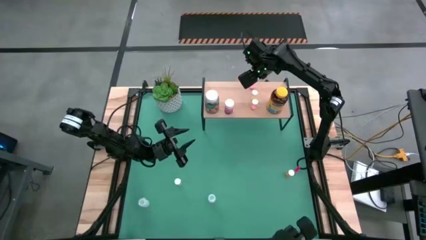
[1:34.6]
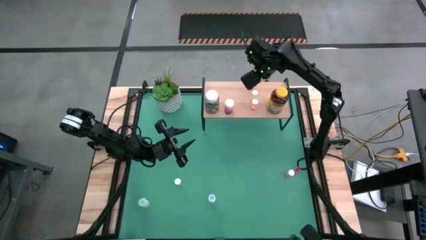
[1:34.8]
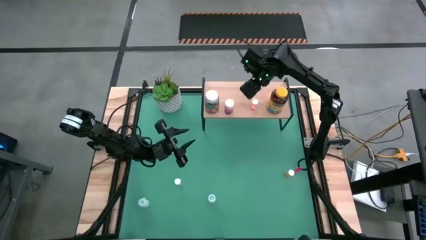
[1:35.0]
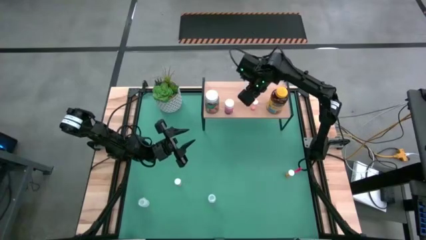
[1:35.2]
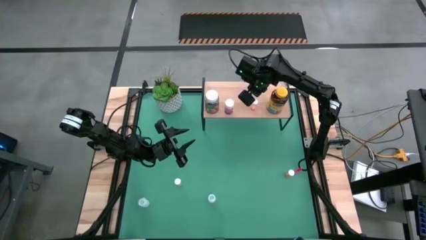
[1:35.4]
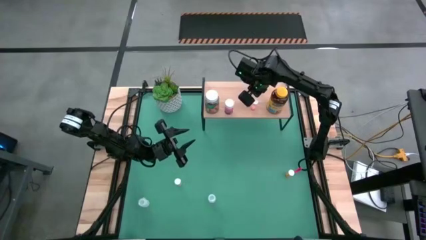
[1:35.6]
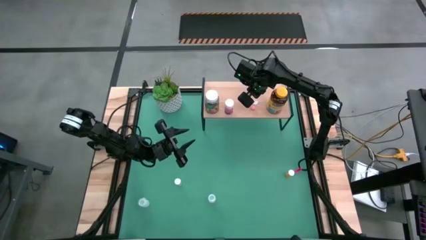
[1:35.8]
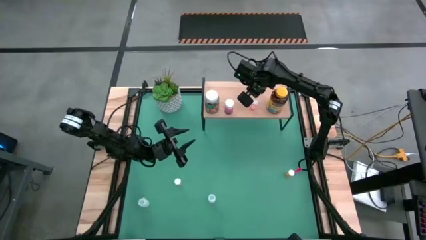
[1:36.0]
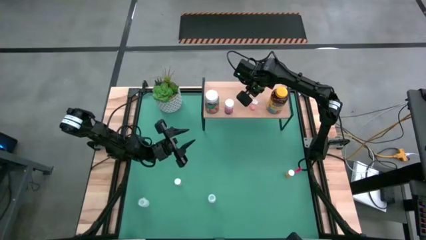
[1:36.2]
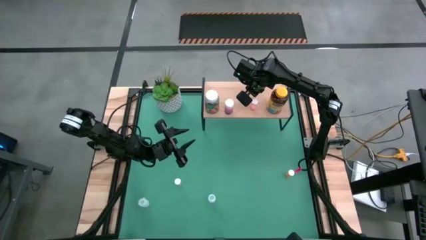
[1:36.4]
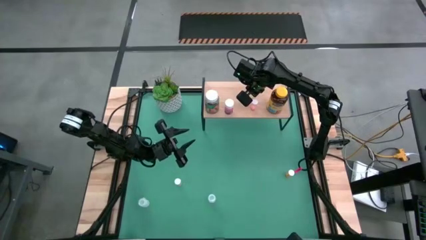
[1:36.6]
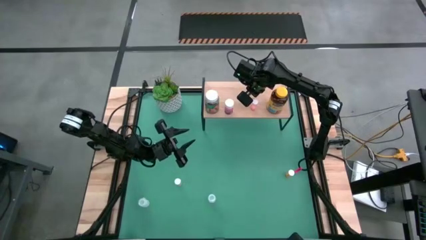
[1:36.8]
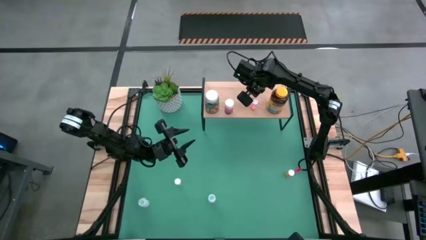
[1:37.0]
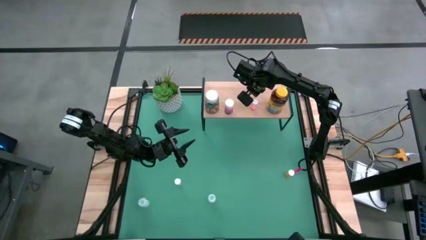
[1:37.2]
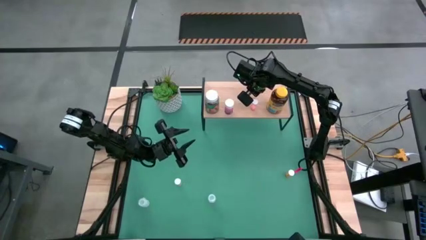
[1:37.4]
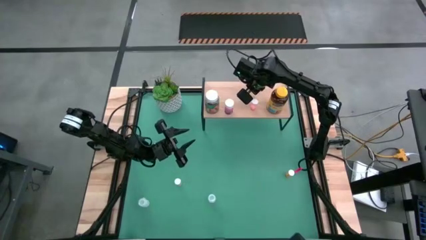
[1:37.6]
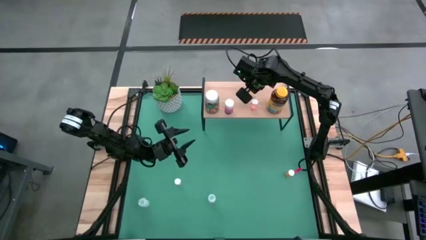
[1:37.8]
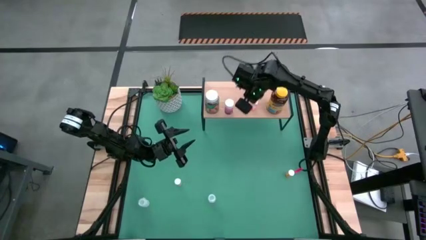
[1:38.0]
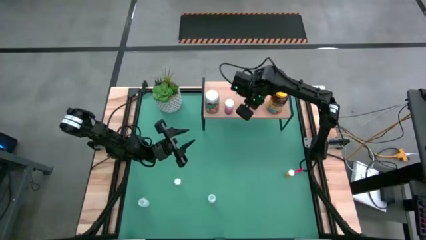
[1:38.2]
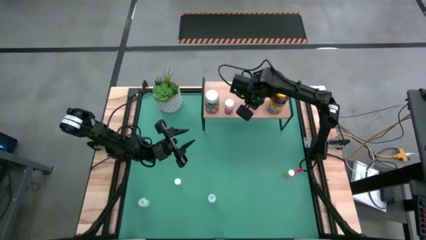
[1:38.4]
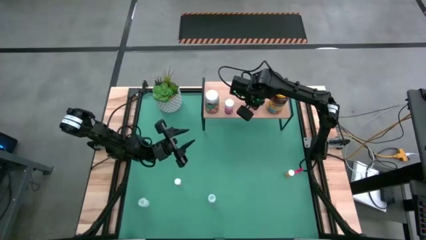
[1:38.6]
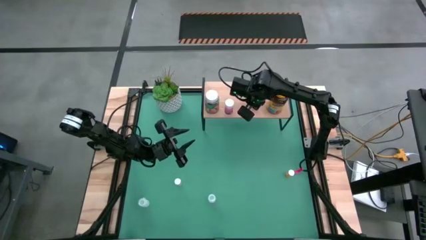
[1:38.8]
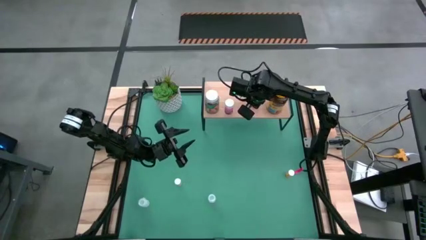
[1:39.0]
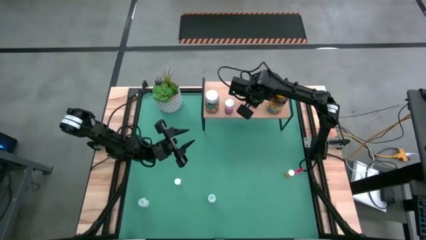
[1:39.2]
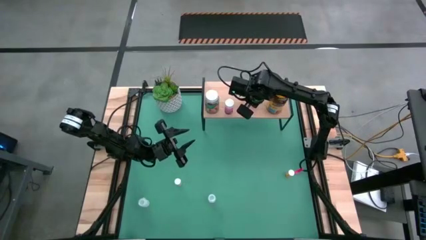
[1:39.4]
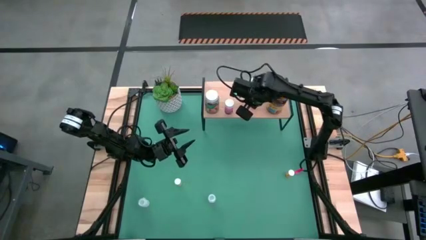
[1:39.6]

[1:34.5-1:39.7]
Task: Pick and place medicine bottles onto shelf by color
Adjust the small medicine bottles on the shelf

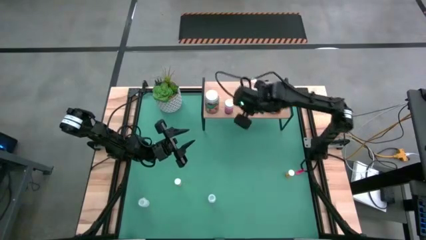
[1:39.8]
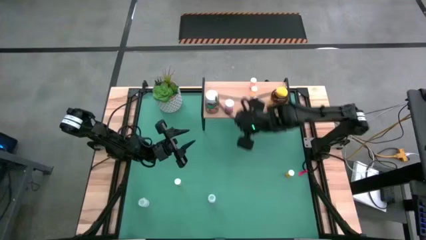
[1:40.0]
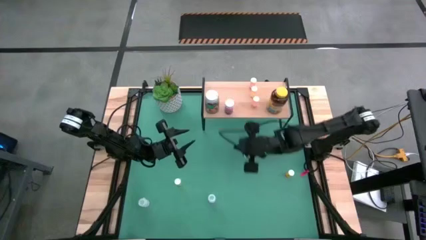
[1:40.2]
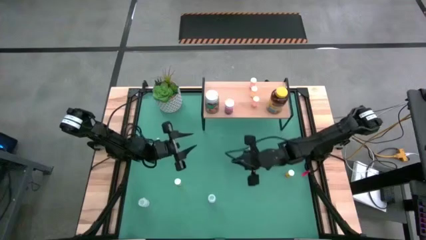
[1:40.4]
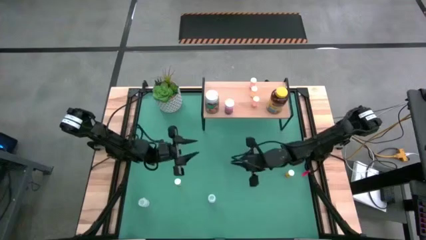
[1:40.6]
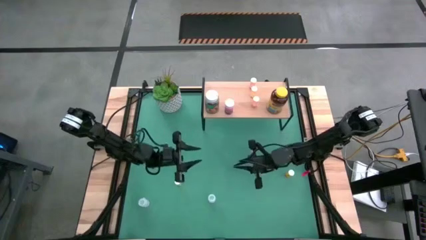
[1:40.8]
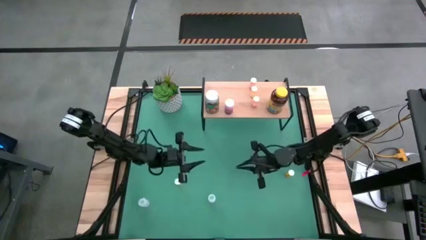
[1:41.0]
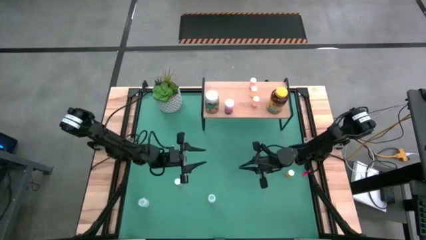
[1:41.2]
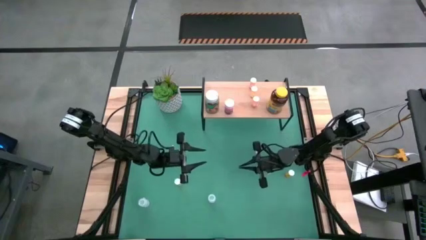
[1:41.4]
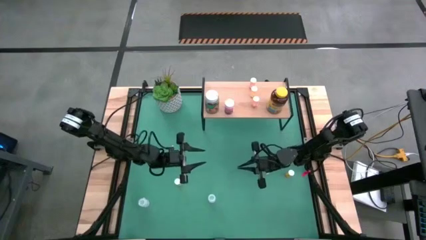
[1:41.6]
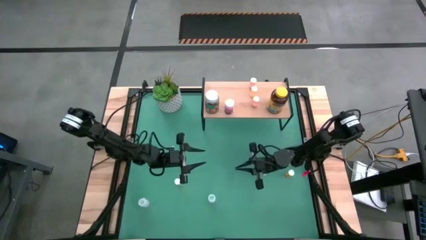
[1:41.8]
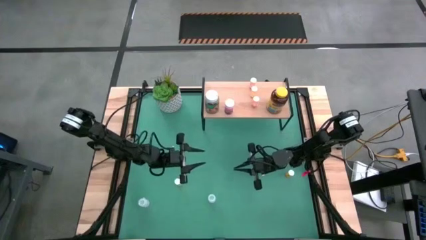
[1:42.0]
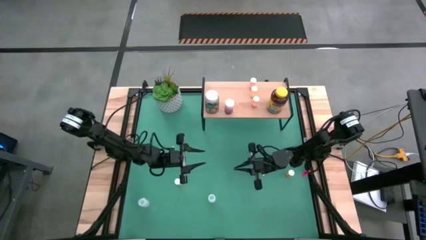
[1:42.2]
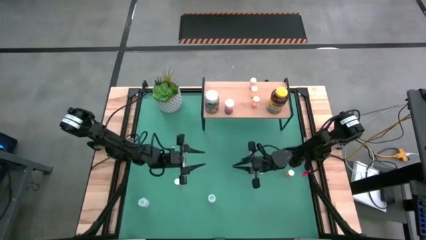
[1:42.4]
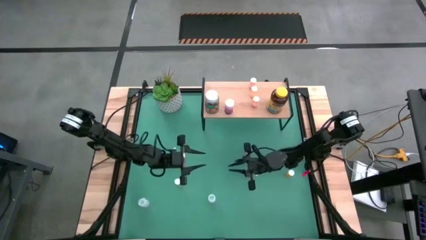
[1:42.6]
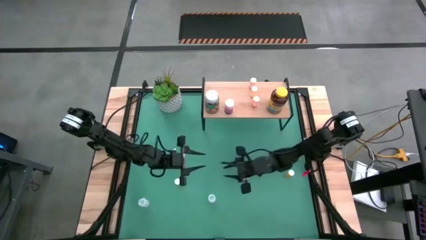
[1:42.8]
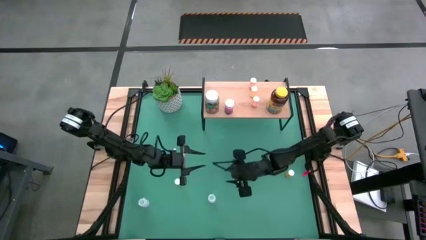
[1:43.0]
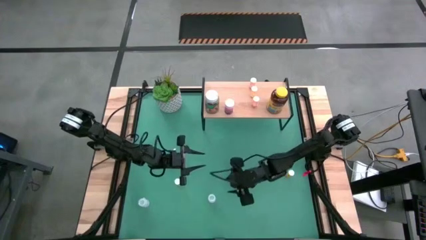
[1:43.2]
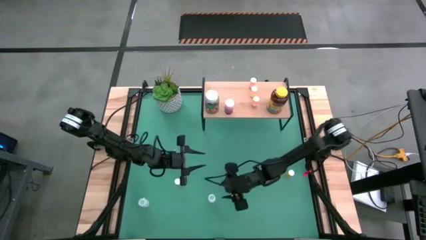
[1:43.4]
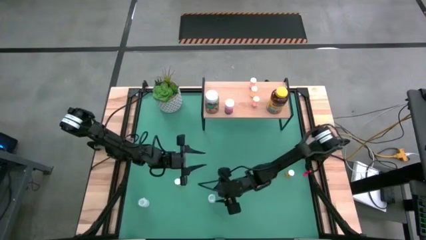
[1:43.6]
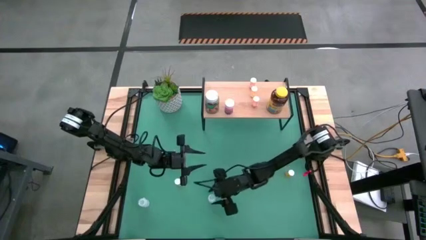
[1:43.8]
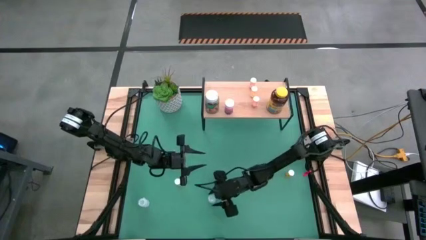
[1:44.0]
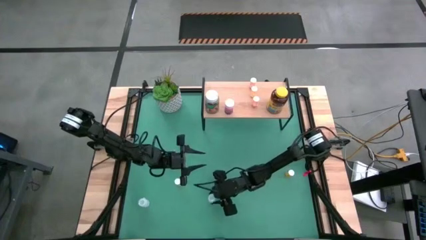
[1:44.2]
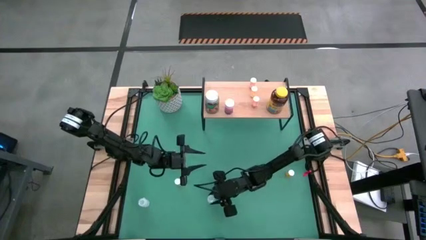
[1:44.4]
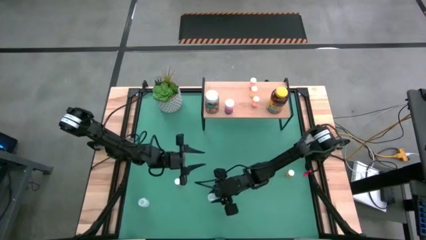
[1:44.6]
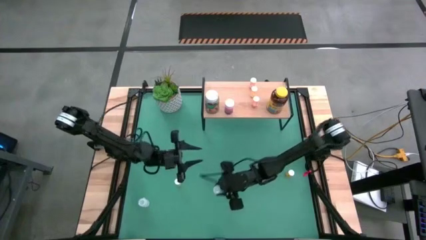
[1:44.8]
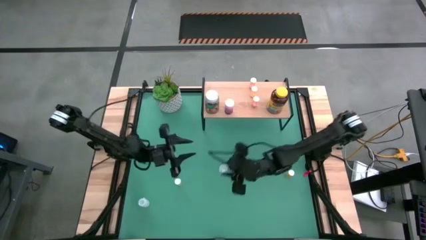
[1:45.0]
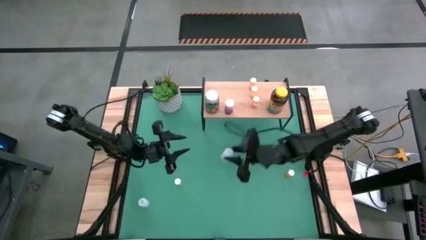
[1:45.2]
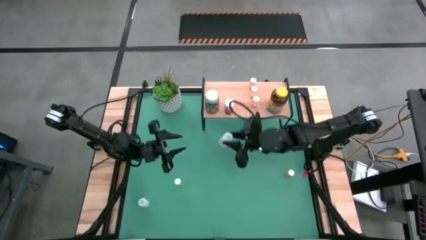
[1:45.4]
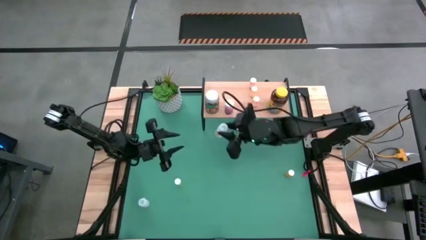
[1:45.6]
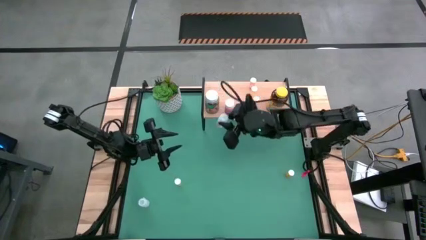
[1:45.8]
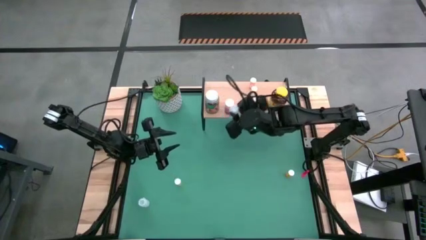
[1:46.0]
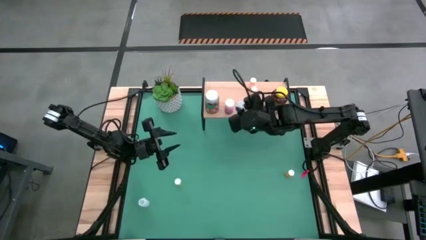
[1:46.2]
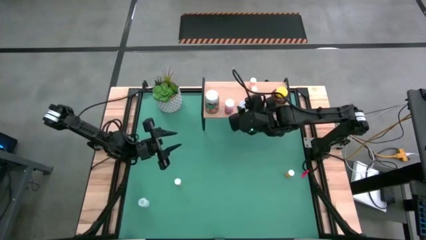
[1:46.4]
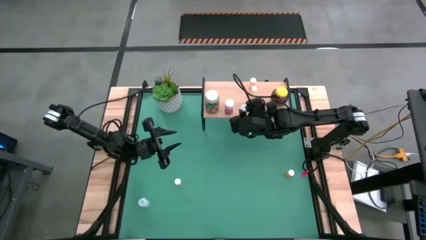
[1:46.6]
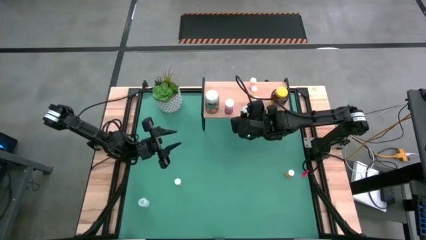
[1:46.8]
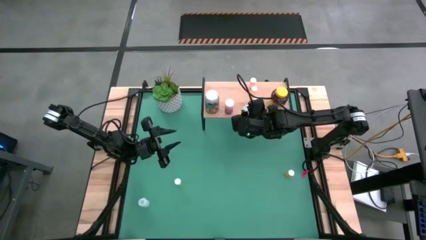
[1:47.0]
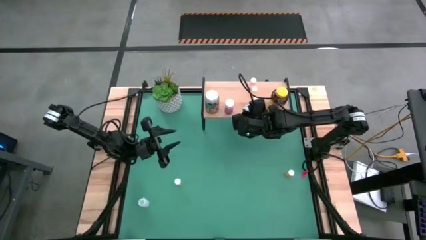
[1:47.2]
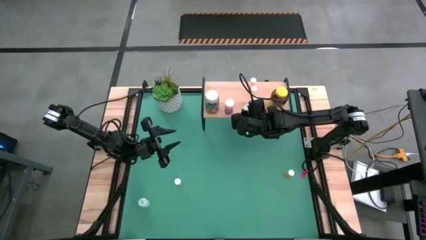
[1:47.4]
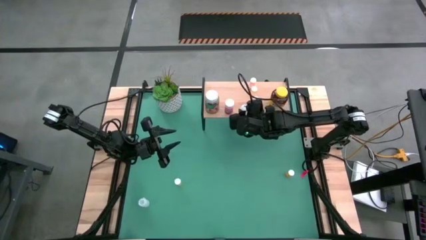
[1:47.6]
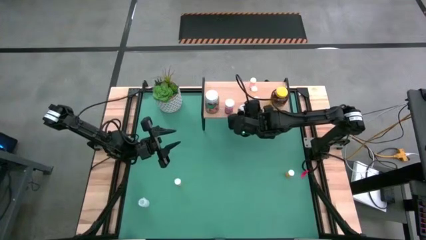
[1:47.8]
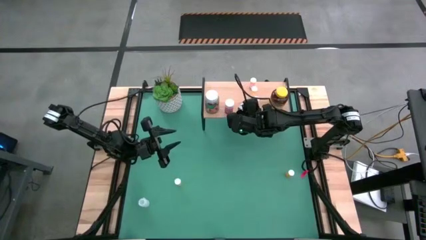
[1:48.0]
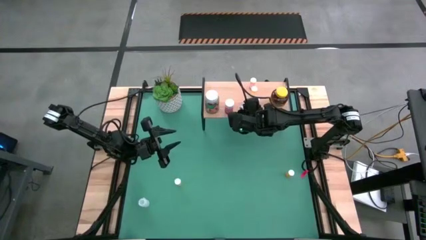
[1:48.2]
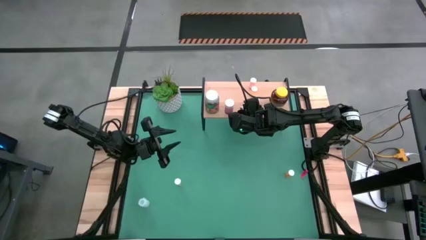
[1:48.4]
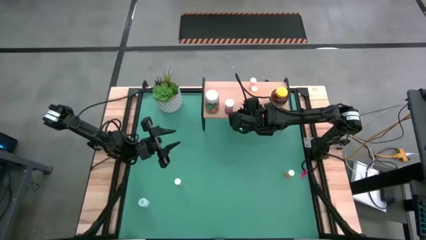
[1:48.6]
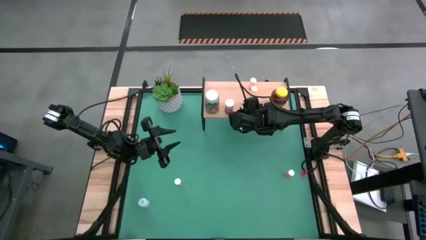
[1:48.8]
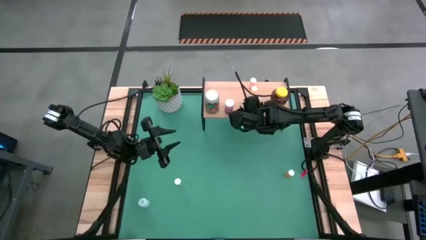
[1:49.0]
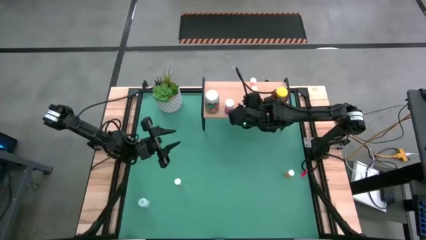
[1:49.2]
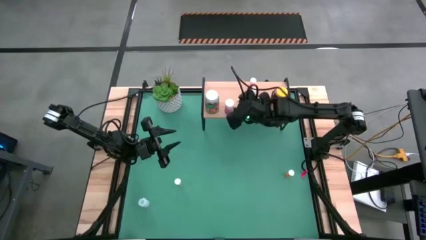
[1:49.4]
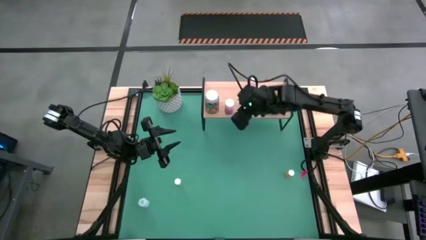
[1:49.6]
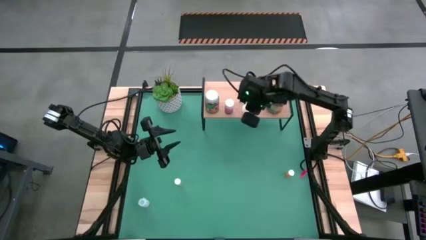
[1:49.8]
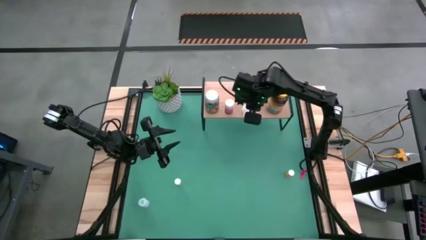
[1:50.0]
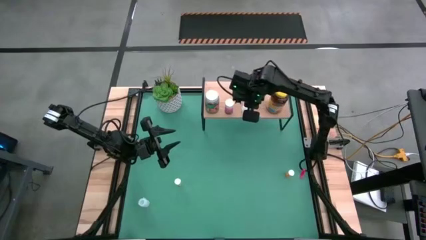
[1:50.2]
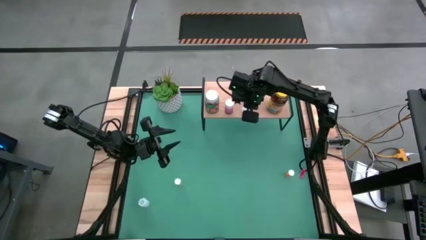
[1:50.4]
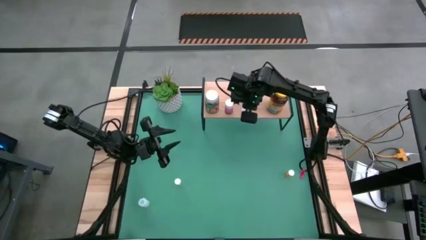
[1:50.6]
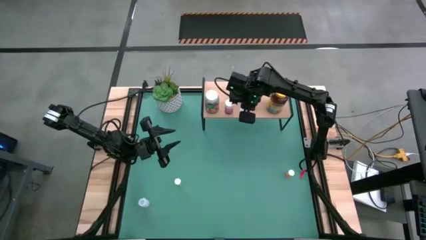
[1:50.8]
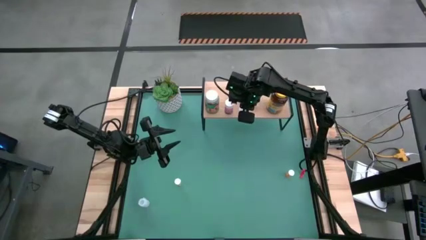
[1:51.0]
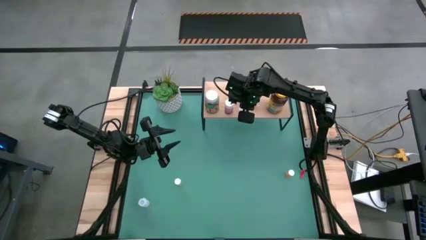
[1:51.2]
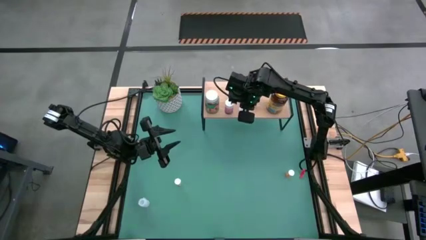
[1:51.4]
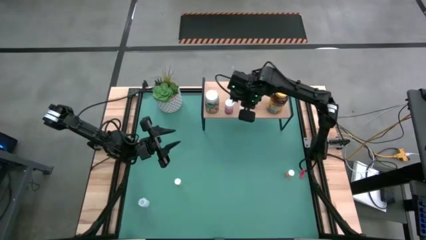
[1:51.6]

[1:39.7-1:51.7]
Put the right transparent medicine bottles on the shelf
